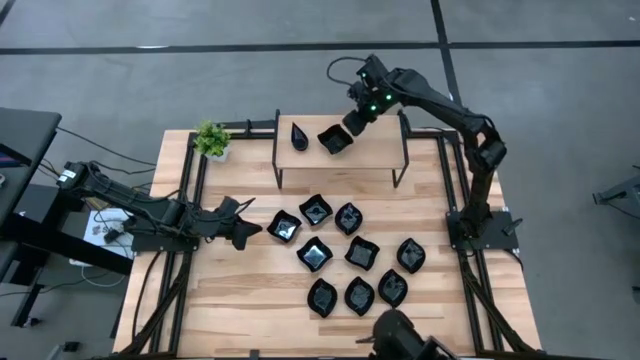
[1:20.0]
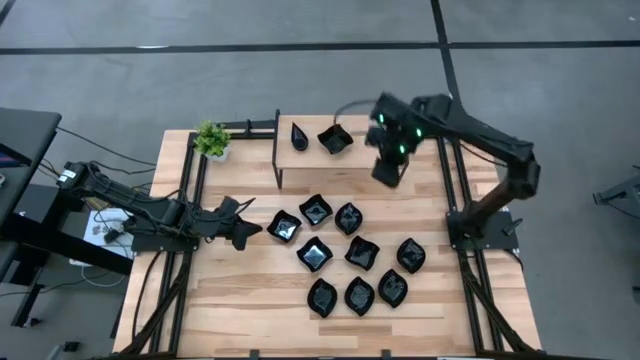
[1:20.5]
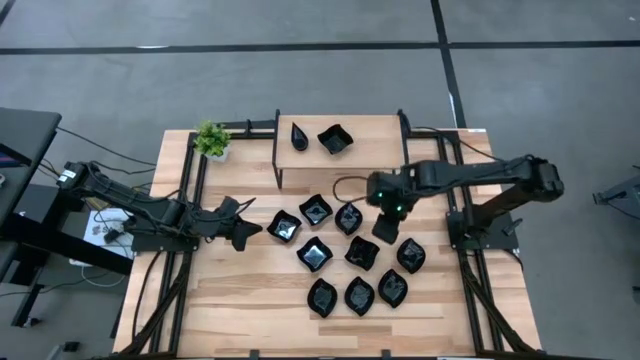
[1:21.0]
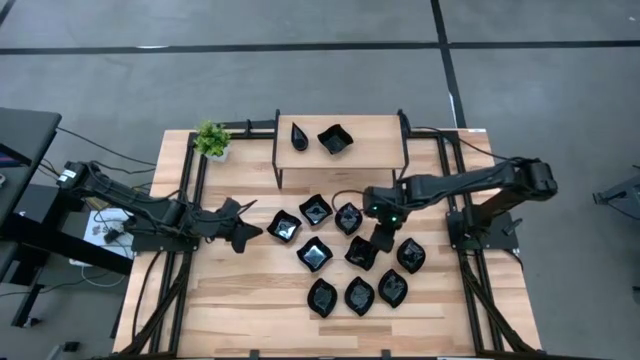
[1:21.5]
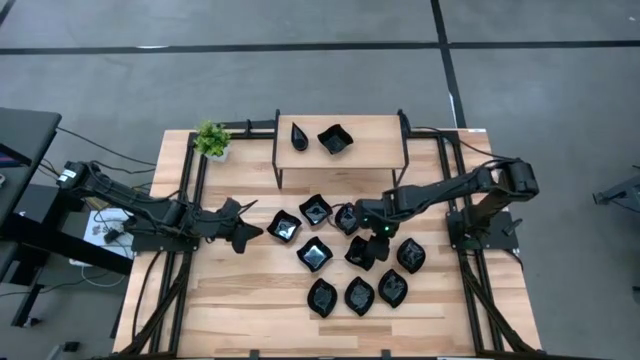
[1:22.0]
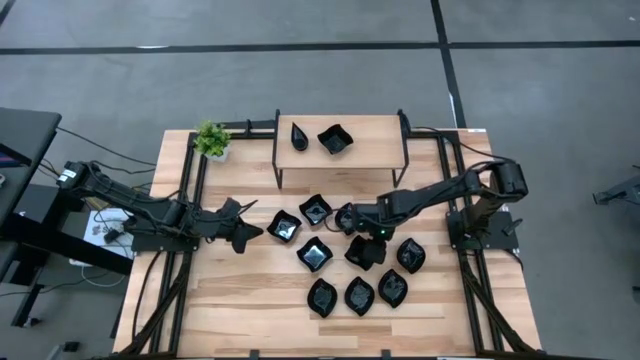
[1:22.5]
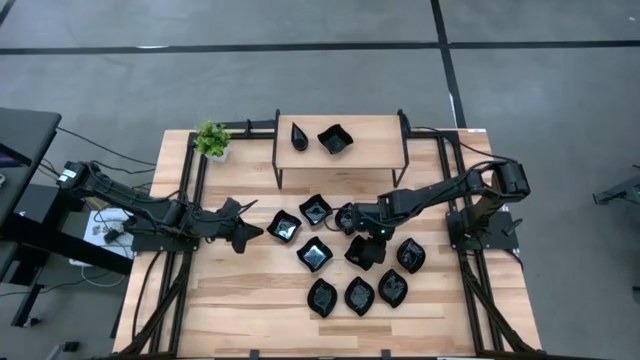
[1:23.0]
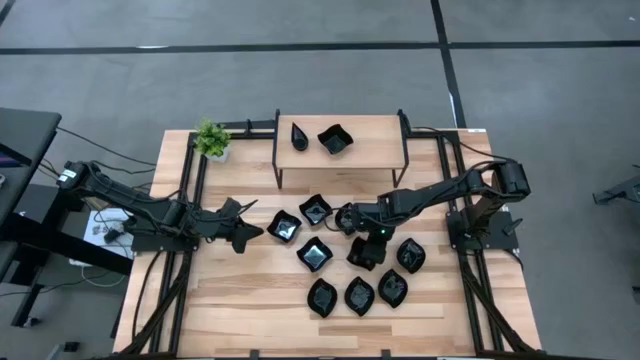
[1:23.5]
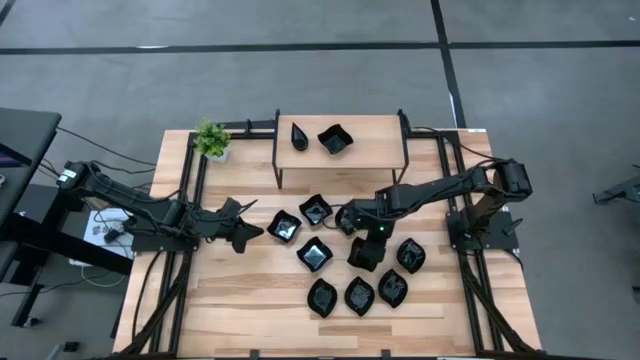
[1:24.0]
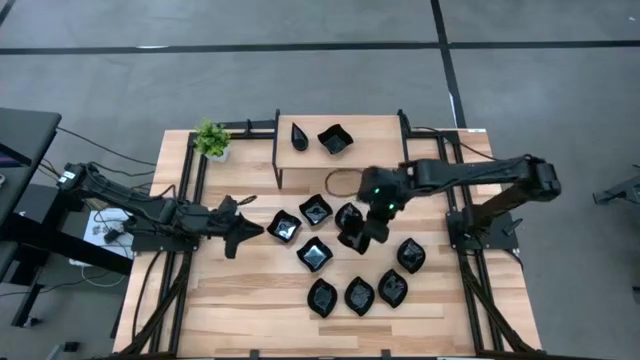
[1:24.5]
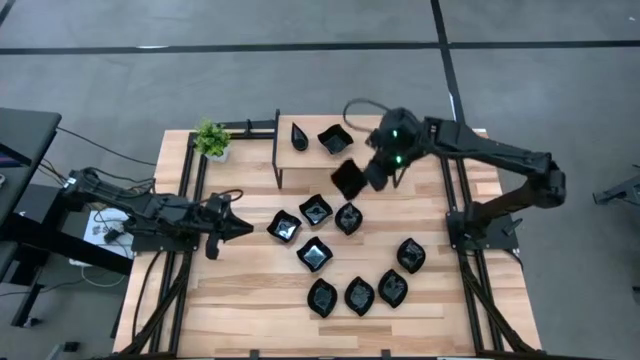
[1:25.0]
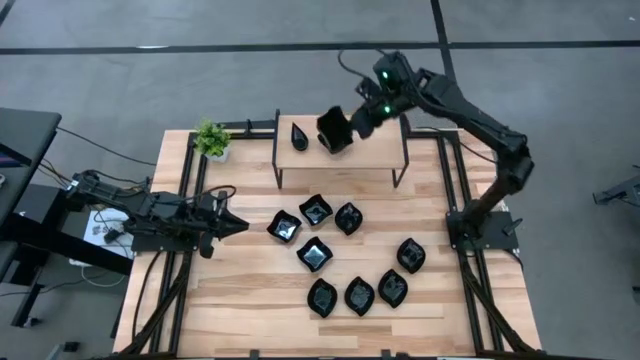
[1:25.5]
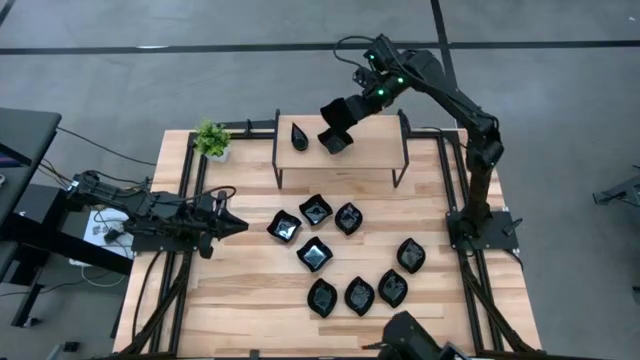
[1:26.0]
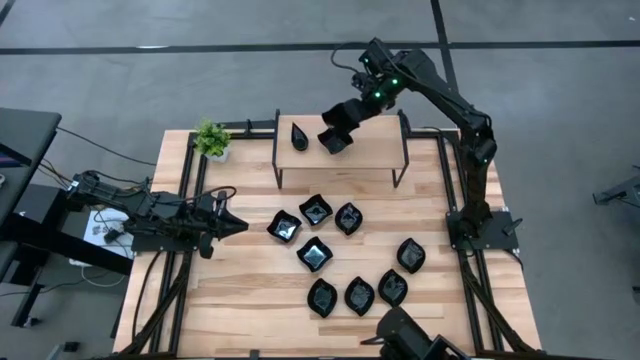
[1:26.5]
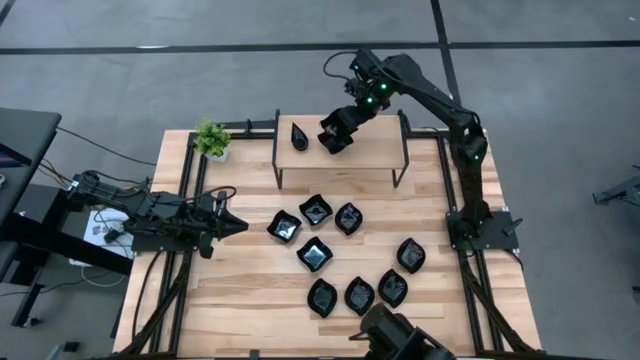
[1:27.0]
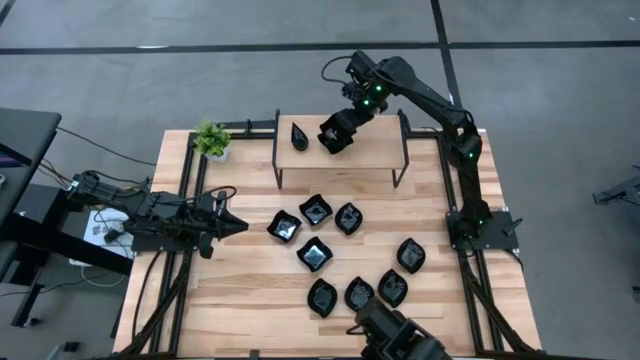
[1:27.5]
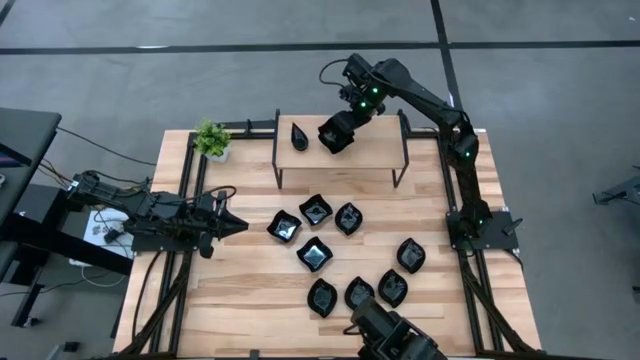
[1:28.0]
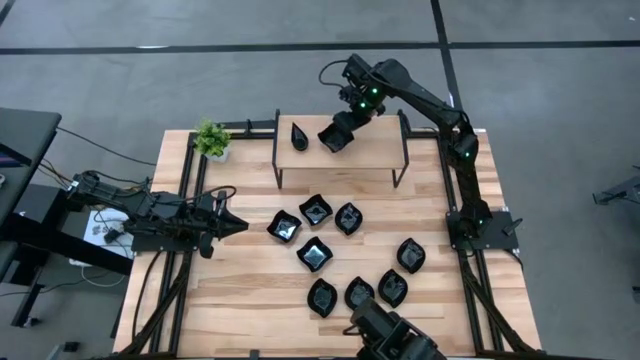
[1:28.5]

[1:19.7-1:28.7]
Task: Pick & Place Mini shaped plates
Stack the distorted square plate on top of the distorted square plate on the shelf

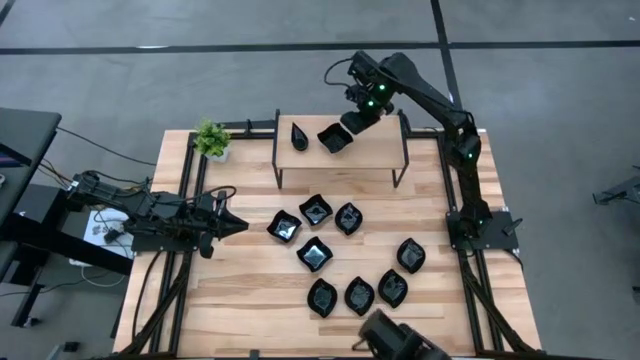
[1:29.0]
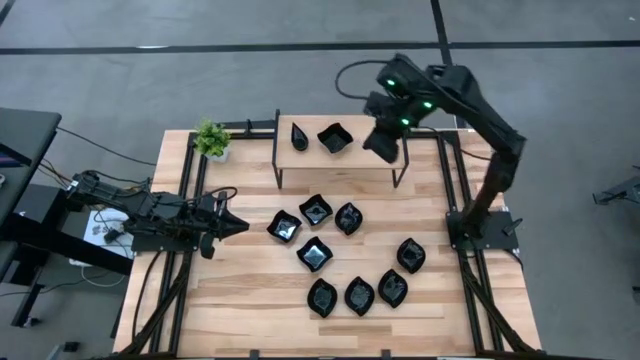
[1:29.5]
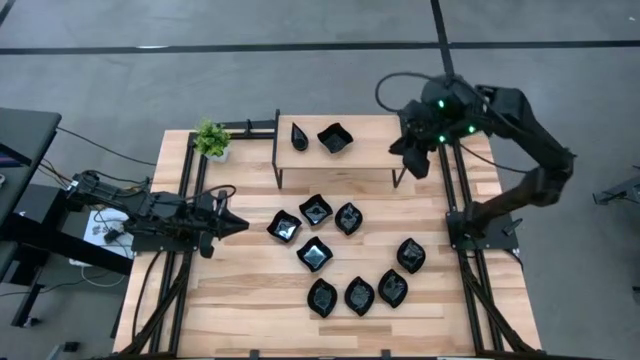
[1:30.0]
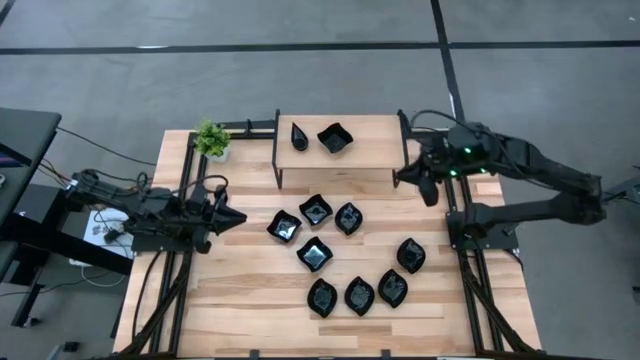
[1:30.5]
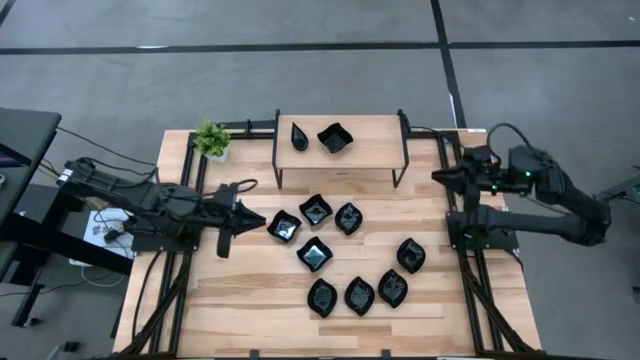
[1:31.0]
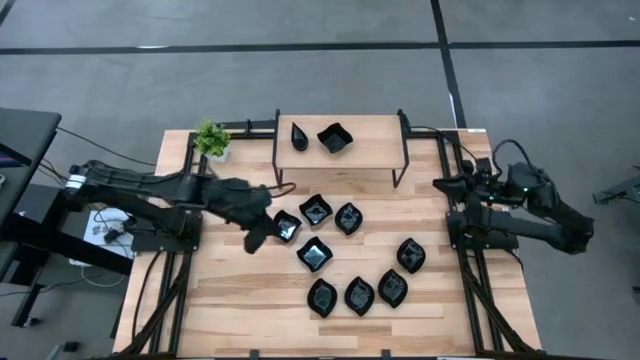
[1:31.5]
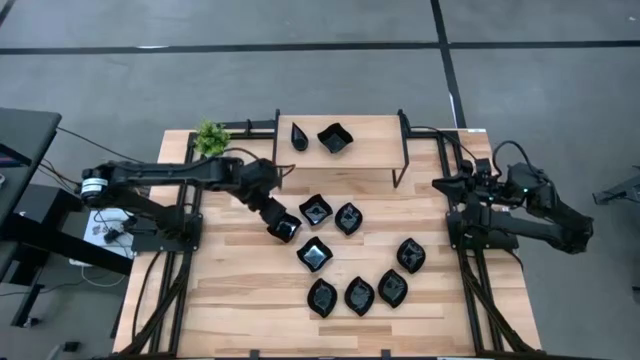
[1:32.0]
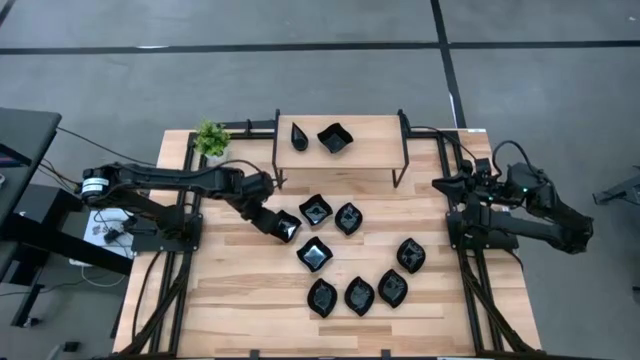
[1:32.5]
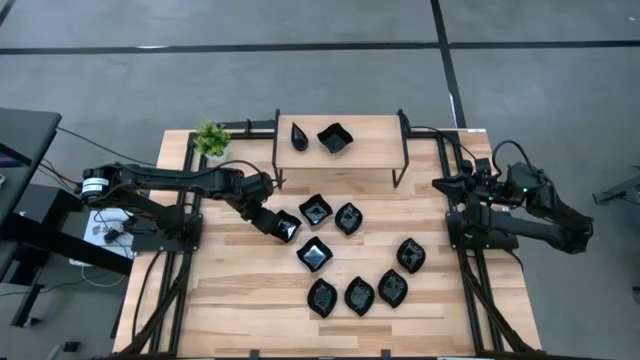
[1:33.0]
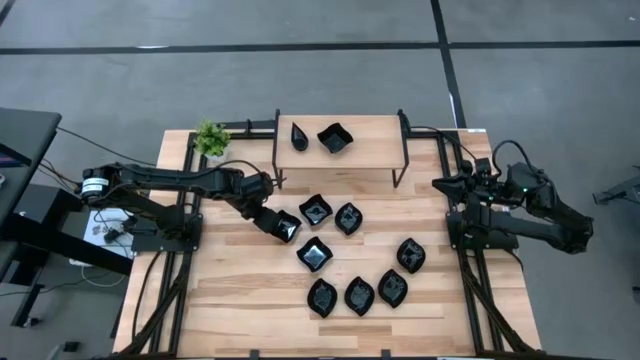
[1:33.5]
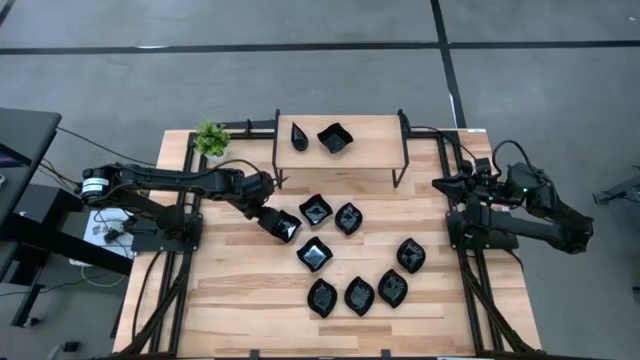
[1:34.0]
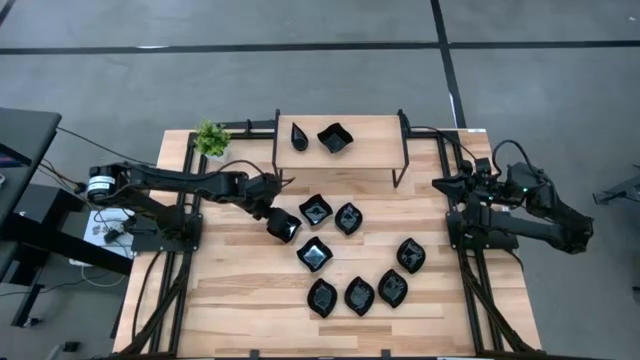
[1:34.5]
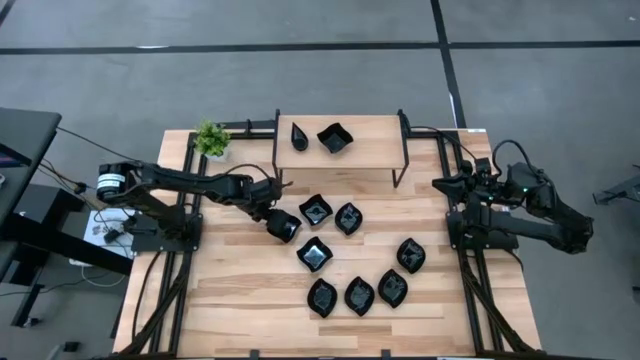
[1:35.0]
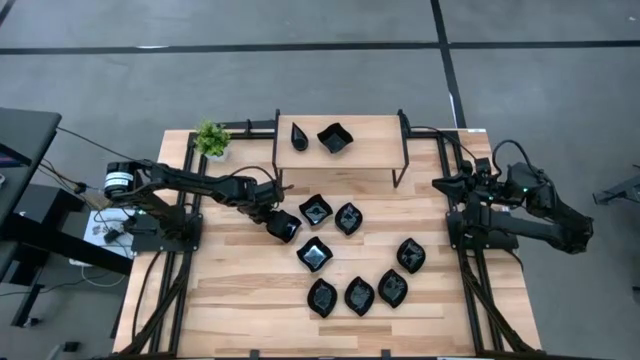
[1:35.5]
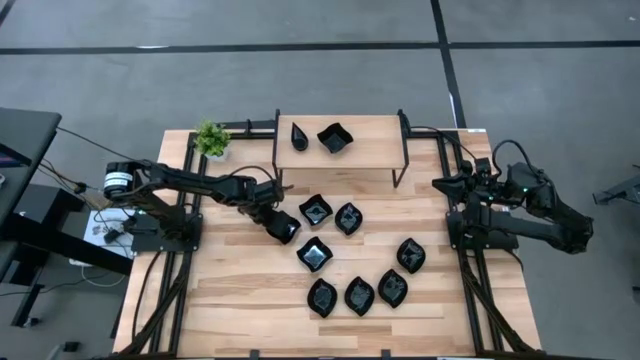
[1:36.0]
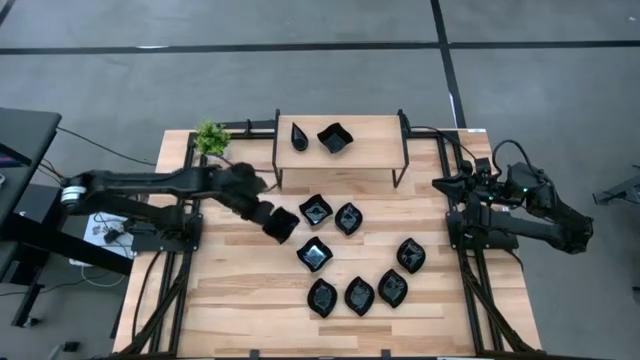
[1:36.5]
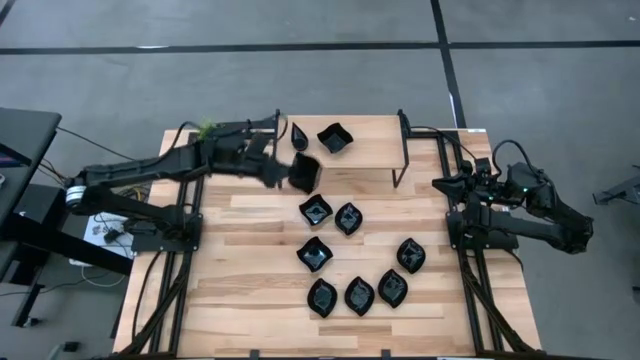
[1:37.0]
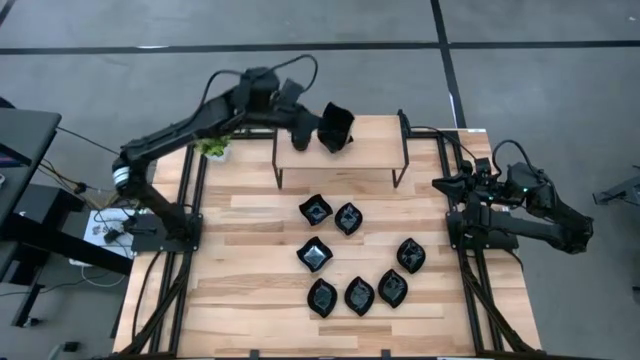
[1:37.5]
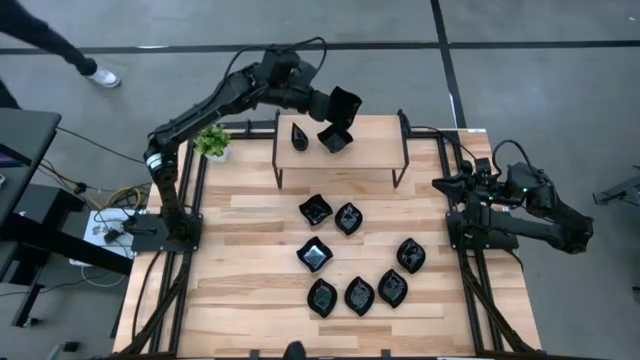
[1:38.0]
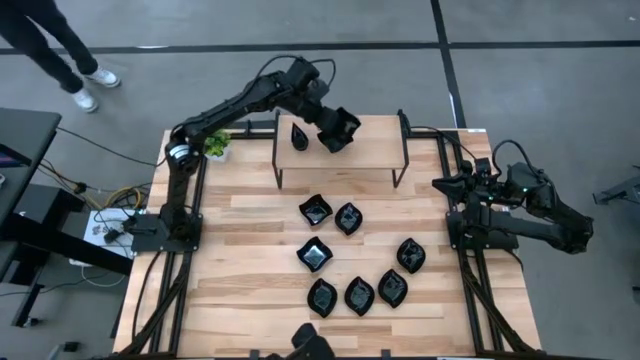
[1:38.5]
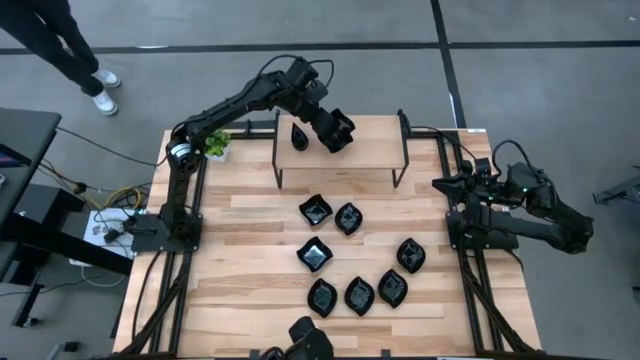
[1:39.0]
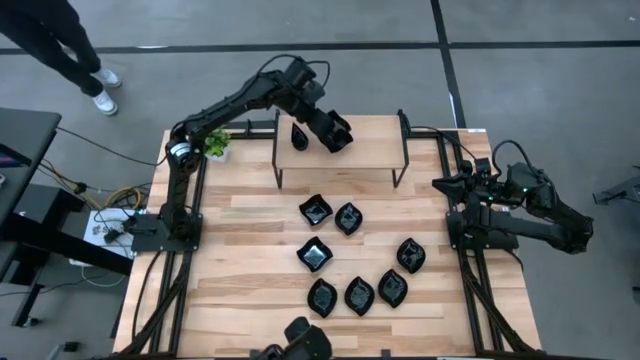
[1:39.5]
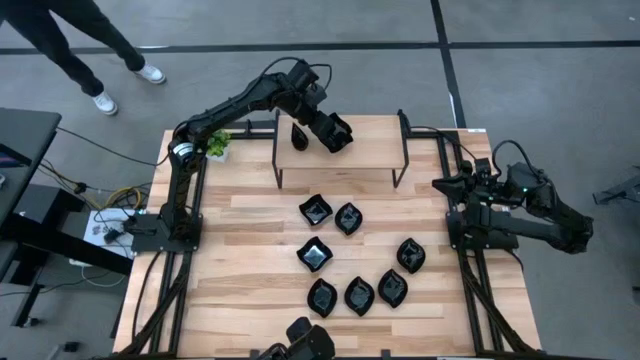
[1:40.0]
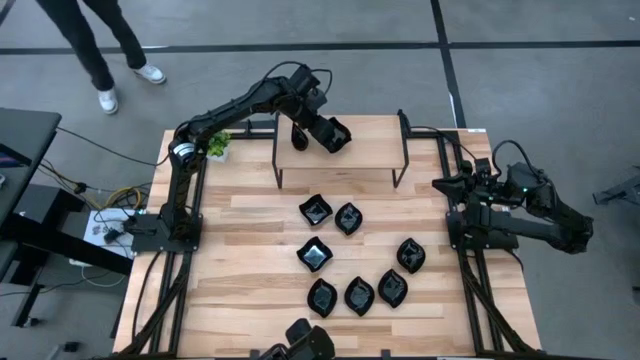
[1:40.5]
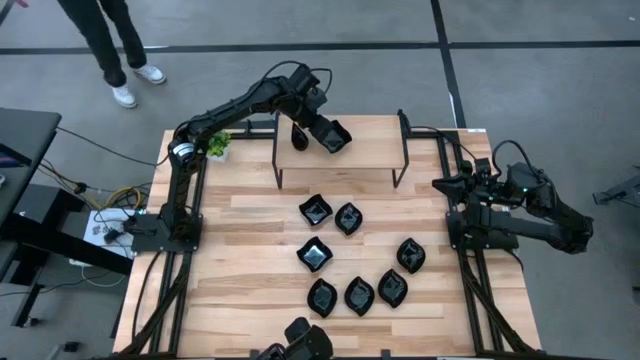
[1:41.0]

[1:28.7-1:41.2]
Stack the distorted square plate on top of the distorted square plates on the shelf
